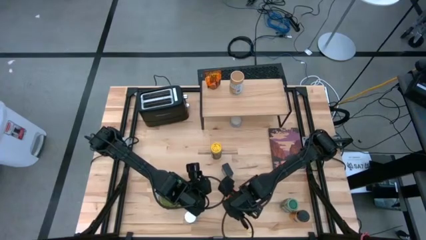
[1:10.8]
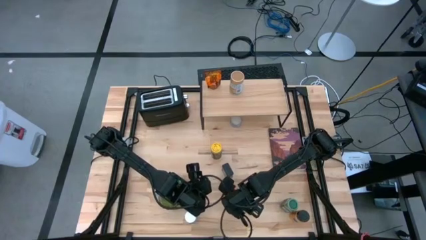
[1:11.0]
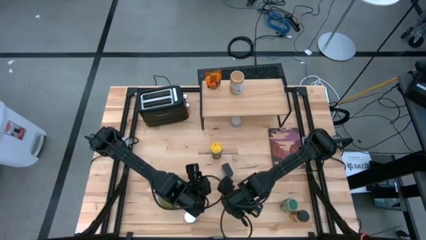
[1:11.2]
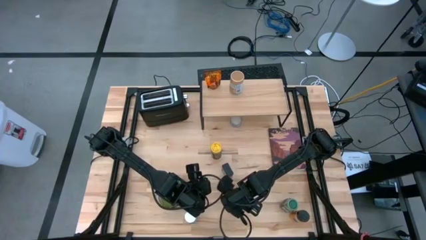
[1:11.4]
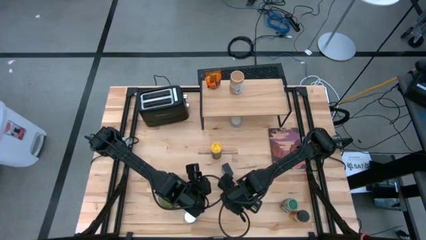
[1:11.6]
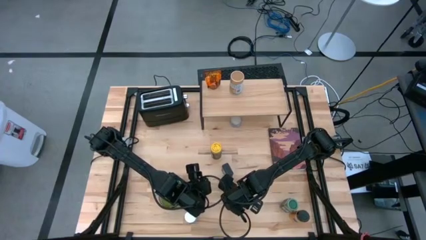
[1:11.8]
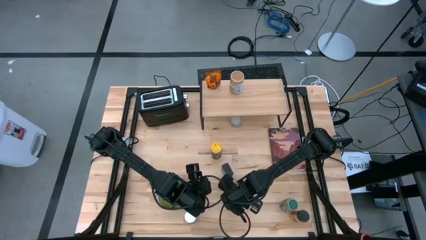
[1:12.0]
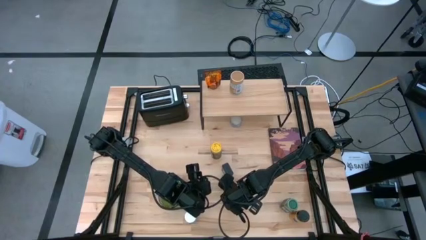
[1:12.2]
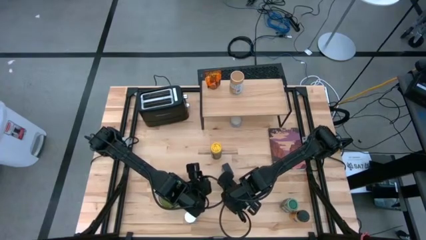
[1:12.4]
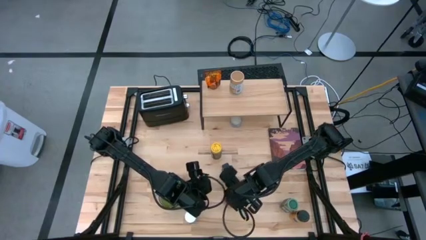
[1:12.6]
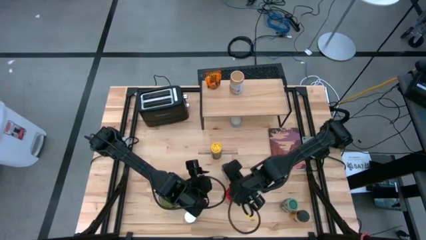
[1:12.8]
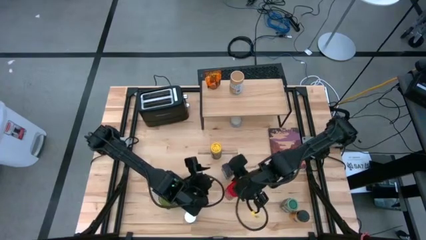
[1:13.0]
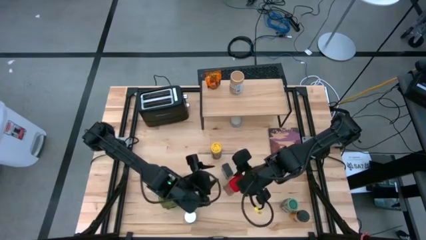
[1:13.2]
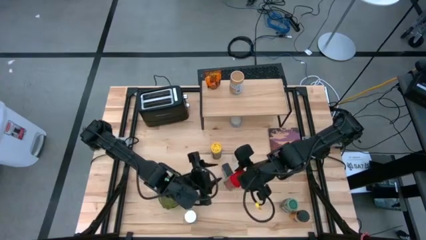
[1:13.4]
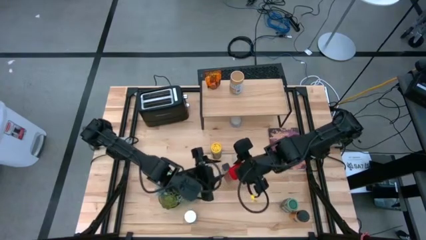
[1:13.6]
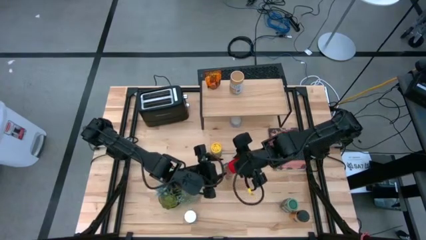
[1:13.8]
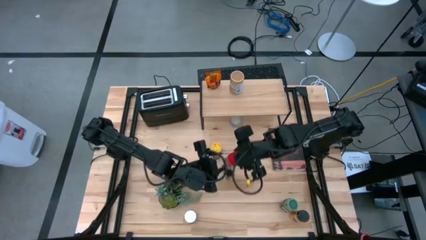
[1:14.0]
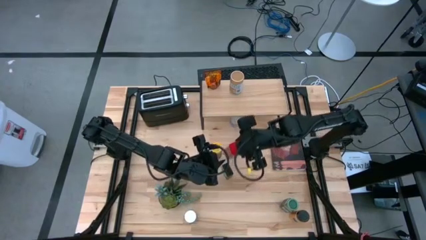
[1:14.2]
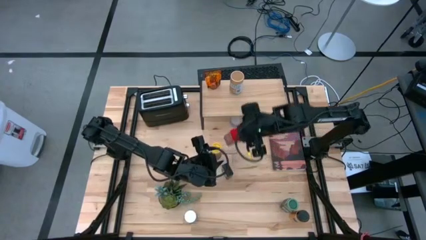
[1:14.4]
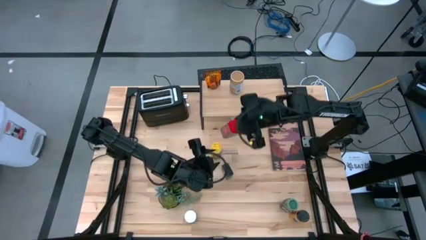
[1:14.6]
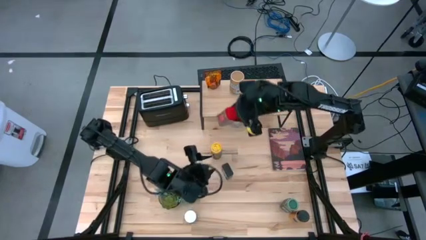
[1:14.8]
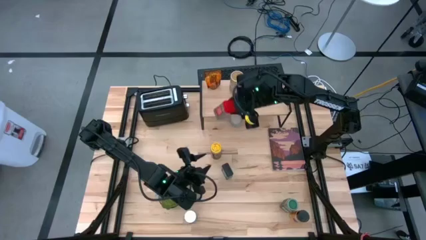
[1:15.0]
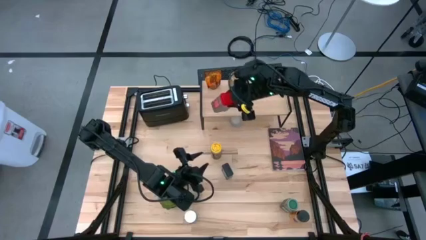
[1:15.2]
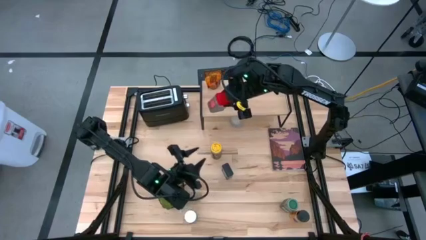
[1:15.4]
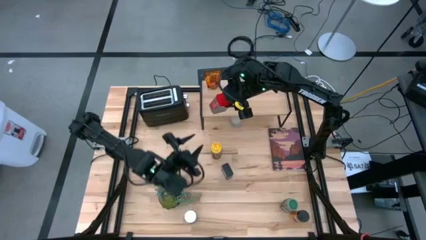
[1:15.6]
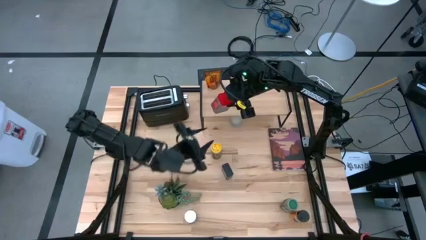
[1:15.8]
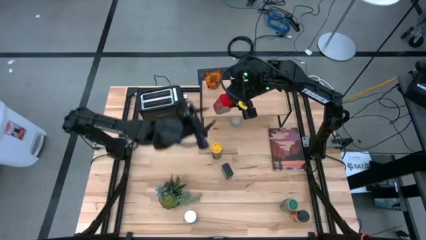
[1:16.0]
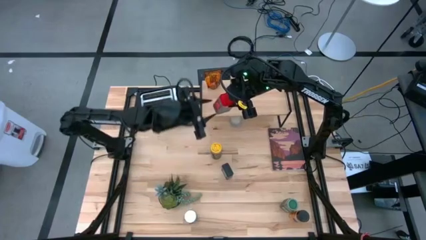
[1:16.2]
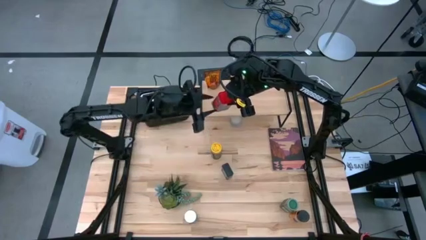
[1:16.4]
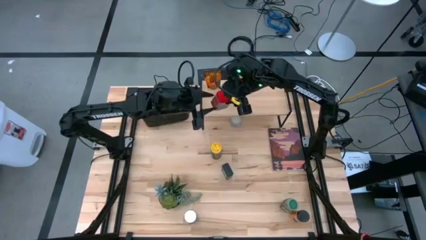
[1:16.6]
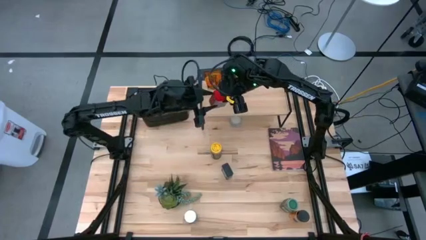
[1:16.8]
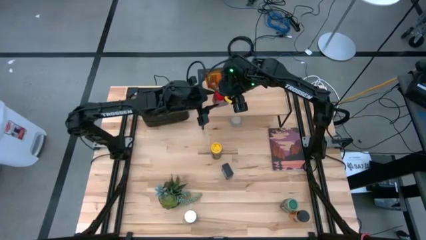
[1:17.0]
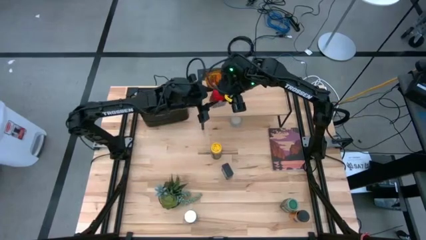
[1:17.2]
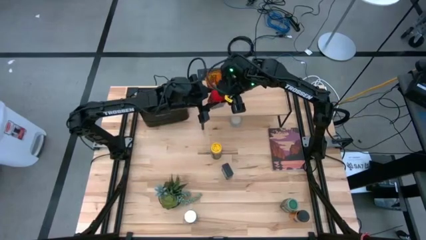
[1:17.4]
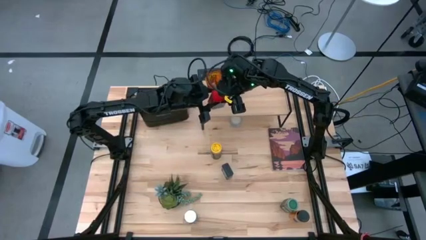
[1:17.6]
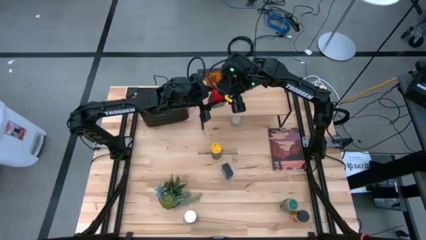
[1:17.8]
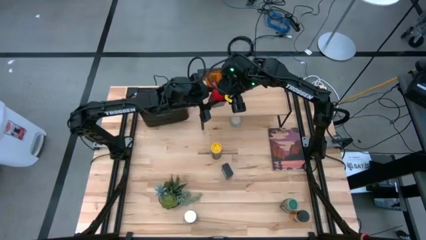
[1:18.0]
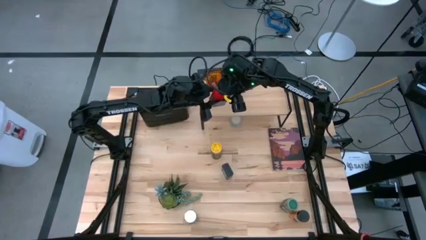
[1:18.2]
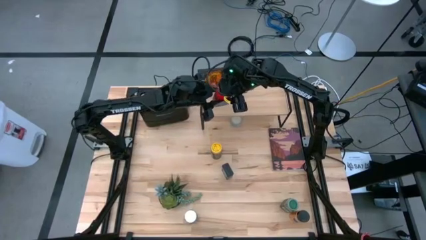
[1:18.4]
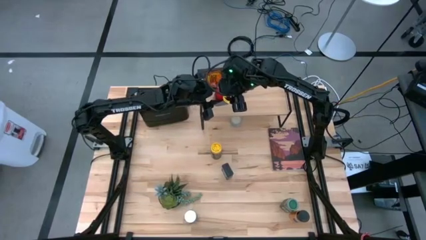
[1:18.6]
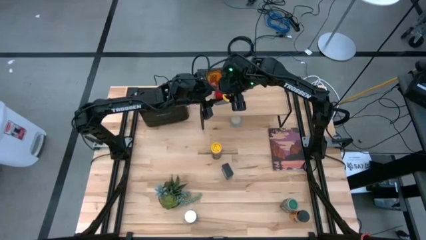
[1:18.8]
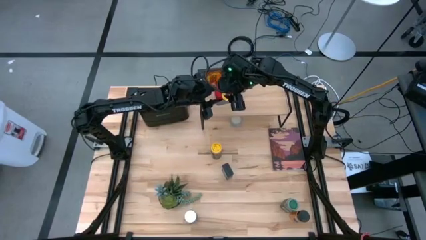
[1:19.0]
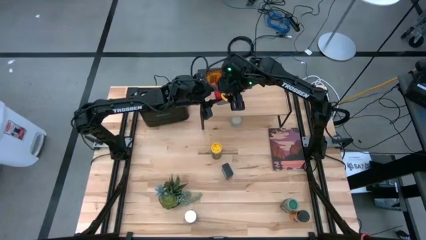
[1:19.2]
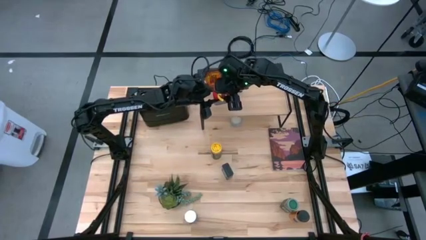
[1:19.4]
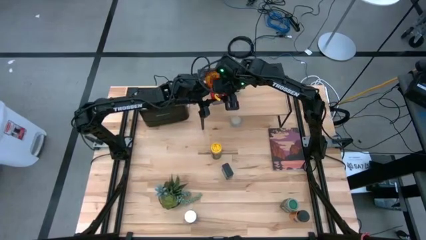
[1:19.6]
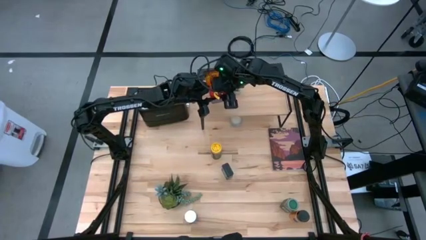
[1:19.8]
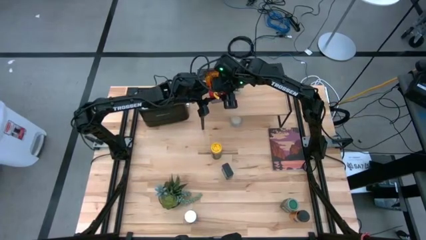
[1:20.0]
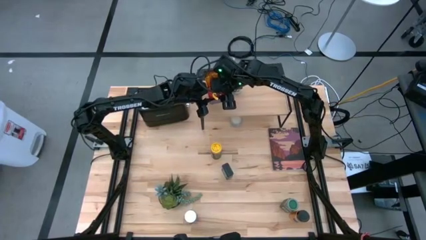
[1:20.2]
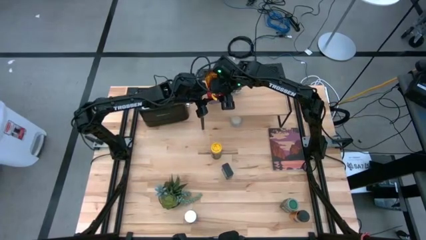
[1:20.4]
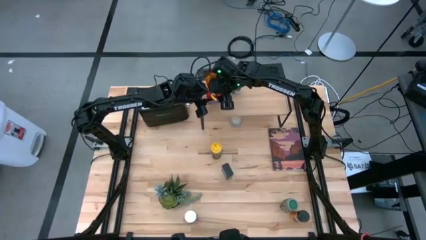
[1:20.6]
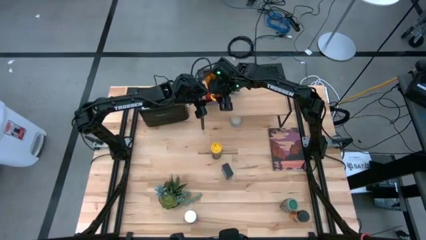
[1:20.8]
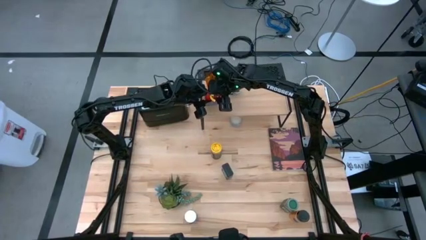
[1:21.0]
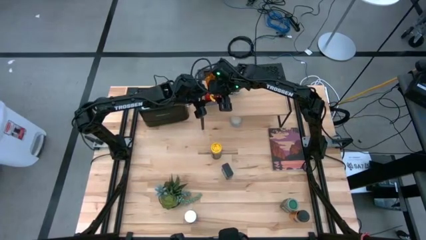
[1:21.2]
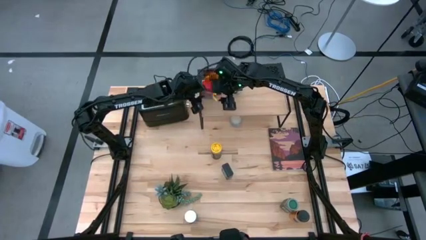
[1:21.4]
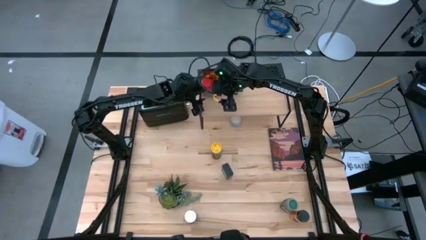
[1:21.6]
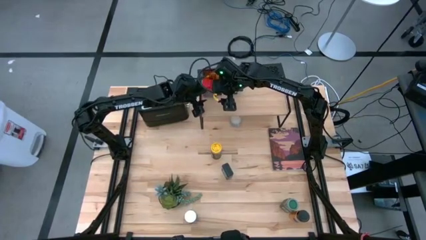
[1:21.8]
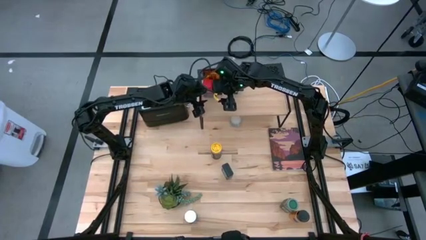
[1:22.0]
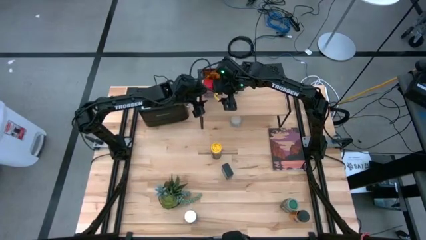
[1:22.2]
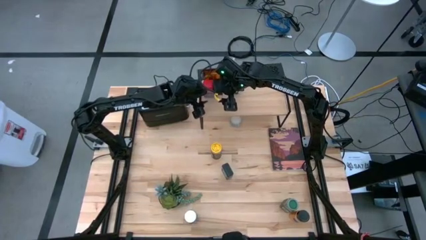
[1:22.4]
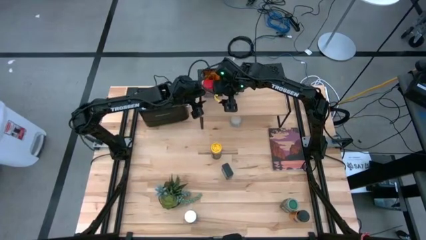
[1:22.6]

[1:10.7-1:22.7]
Task: Shelf spices
Put the red seasoning can on the shelf

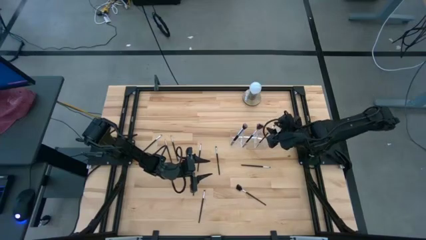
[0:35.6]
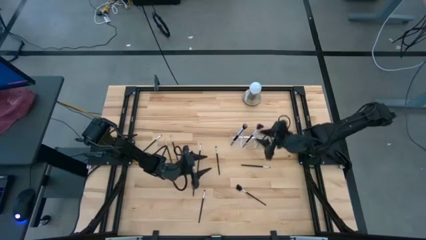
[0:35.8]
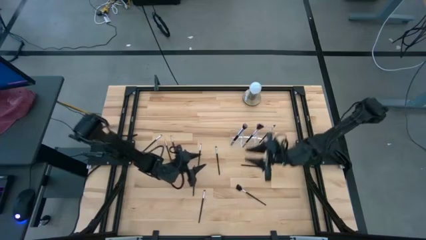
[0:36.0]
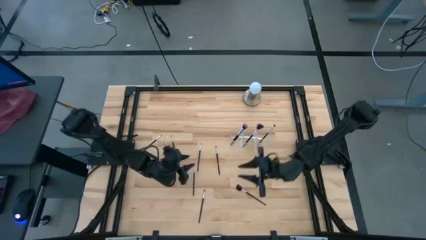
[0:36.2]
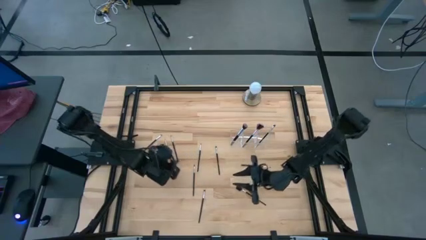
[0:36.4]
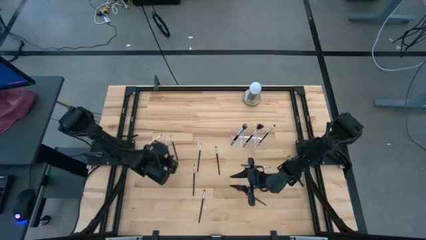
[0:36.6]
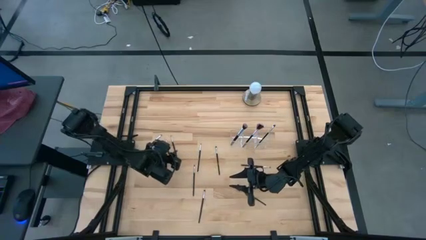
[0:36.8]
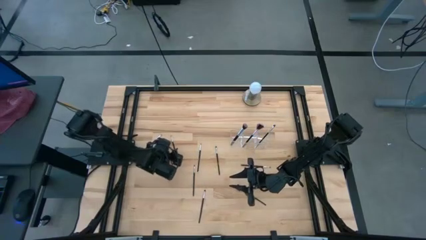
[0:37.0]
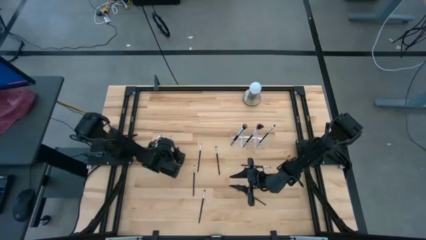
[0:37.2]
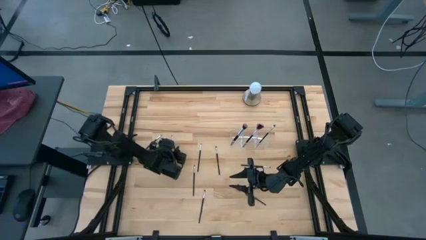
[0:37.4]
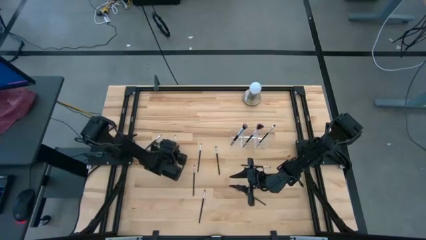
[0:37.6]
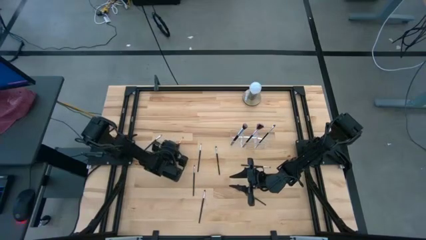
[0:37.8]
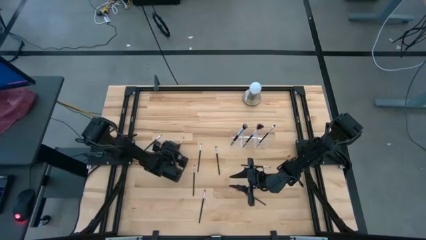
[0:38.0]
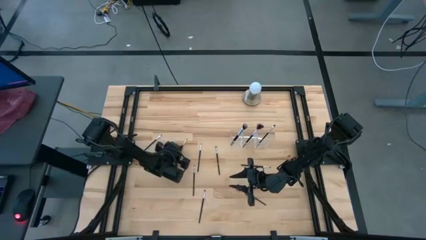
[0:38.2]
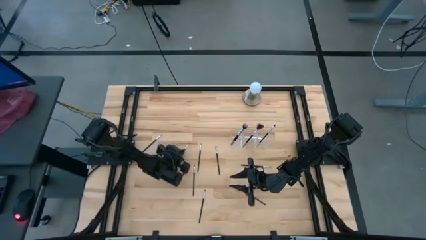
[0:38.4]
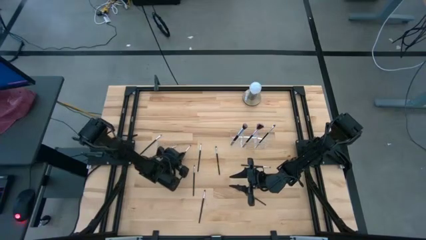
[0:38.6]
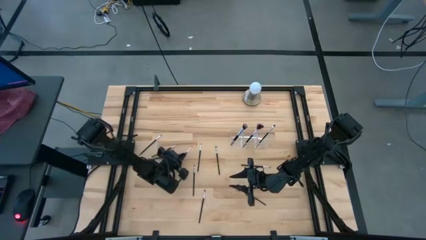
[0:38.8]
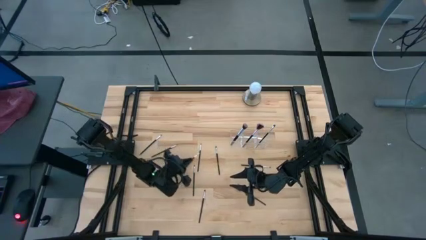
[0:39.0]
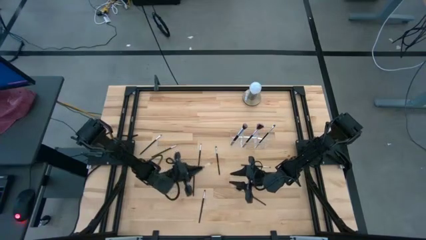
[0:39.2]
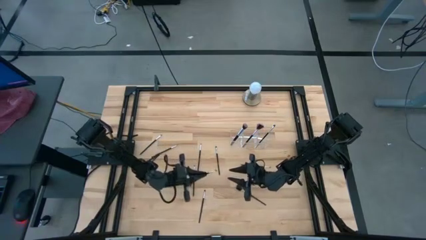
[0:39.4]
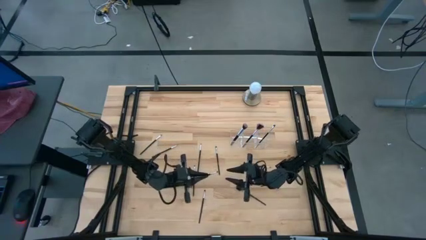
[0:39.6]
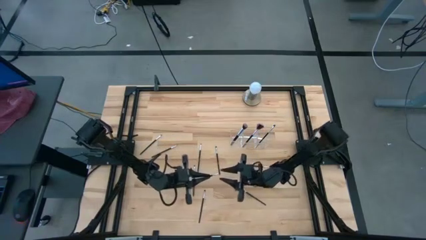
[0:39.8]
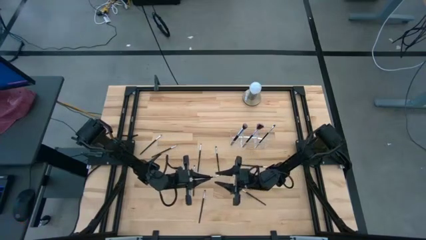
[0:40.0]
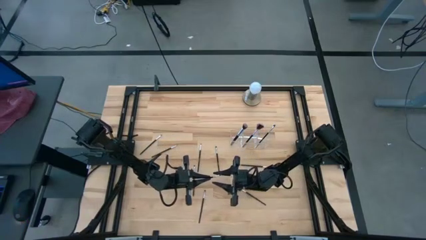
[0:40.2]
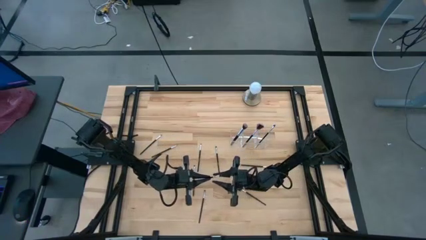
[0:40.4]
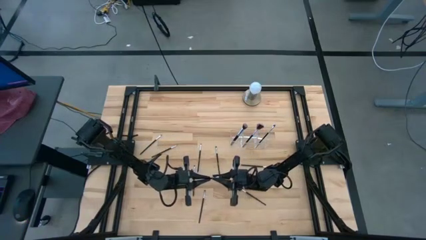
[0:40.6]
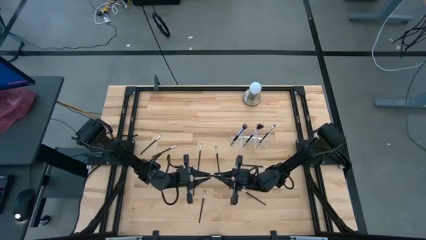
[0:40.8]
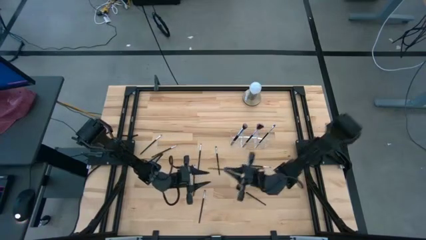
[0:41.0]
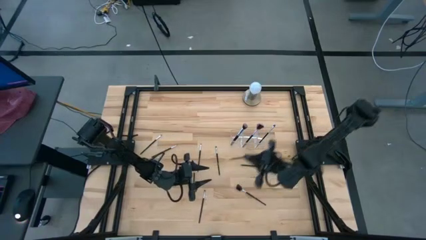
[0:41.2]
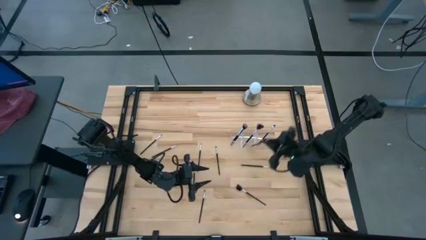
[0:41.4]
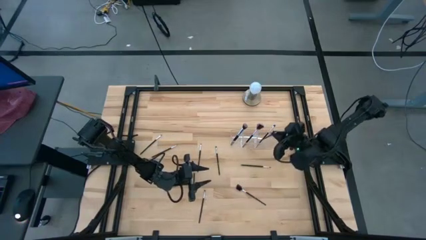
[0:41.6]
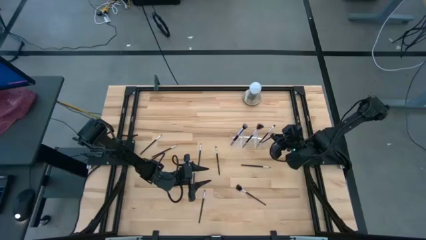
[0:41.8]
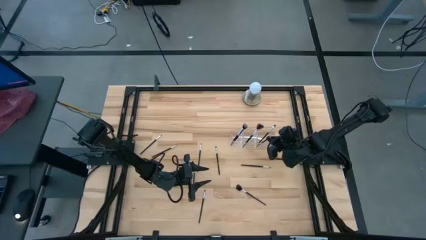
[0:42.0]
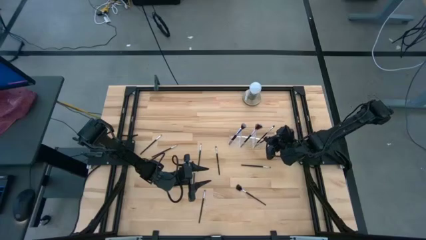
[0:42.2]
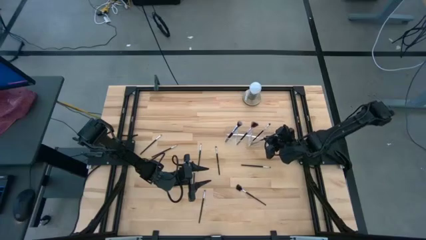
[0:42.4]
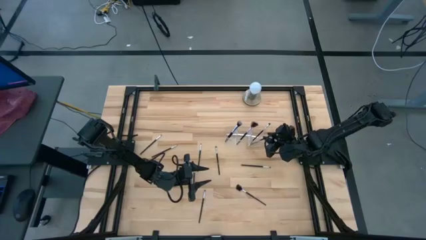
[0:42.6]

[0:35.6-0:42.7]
Task: Put items in baskets/containers
Put the black eyeshadow brush into the transparent organizer
